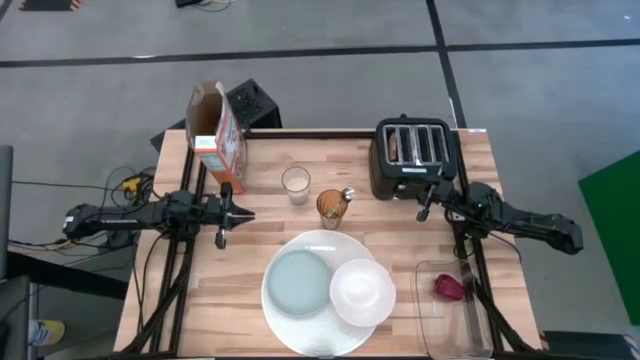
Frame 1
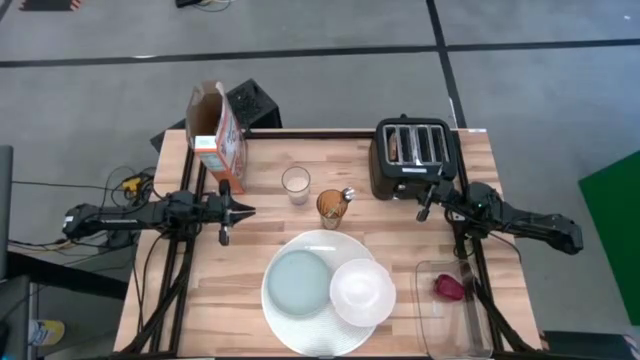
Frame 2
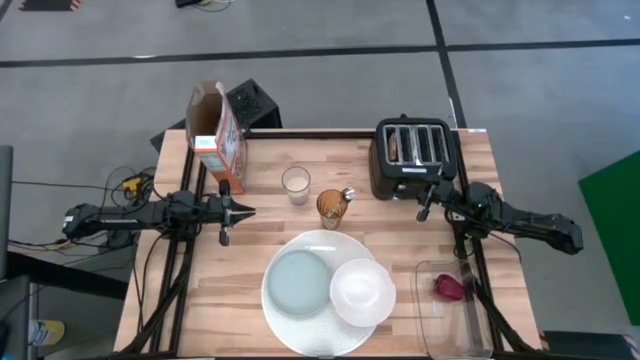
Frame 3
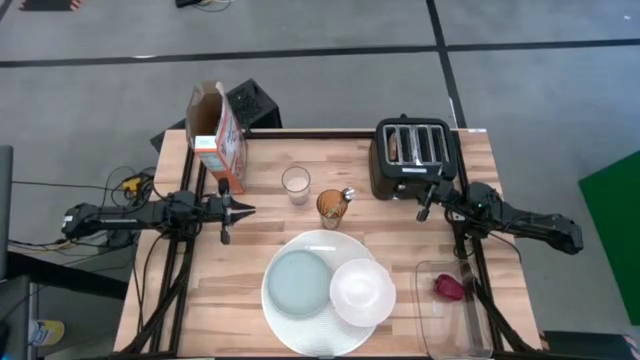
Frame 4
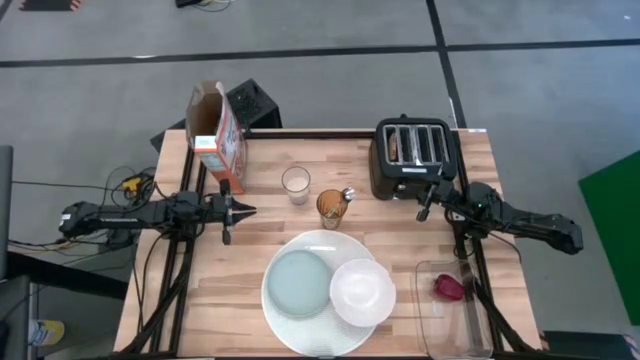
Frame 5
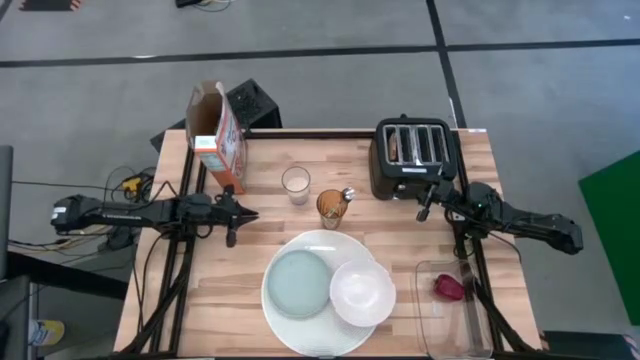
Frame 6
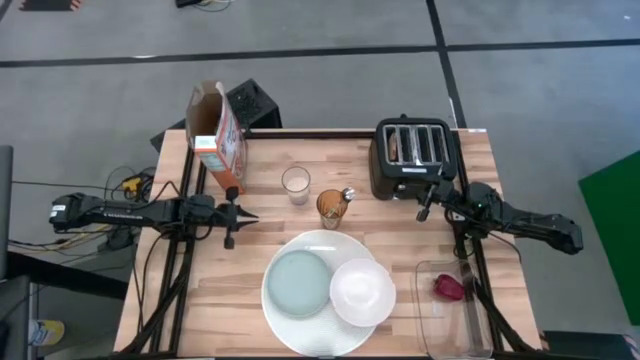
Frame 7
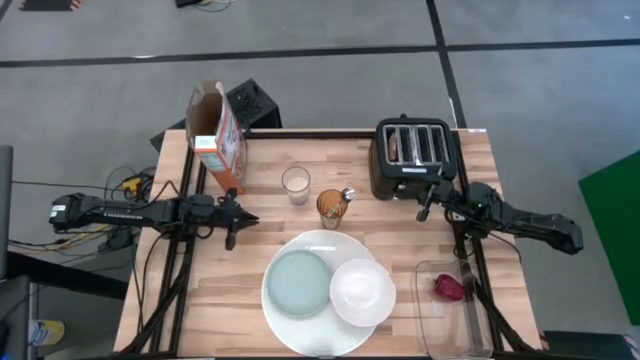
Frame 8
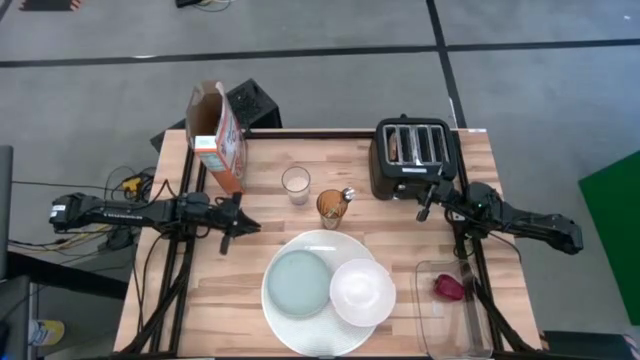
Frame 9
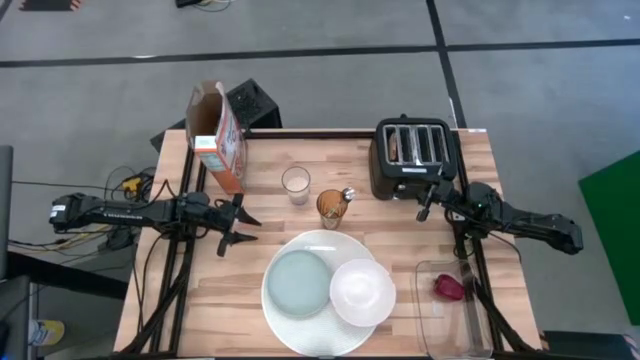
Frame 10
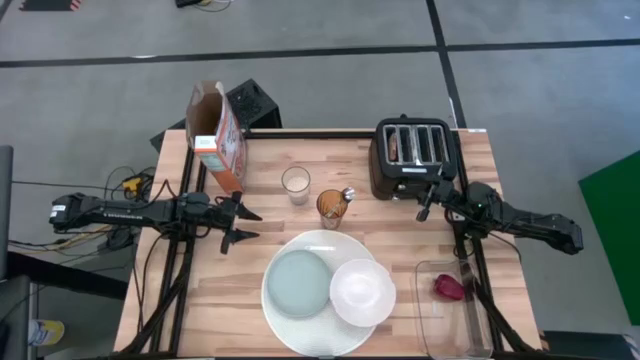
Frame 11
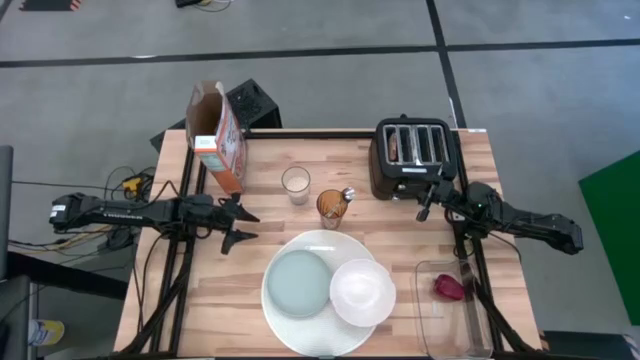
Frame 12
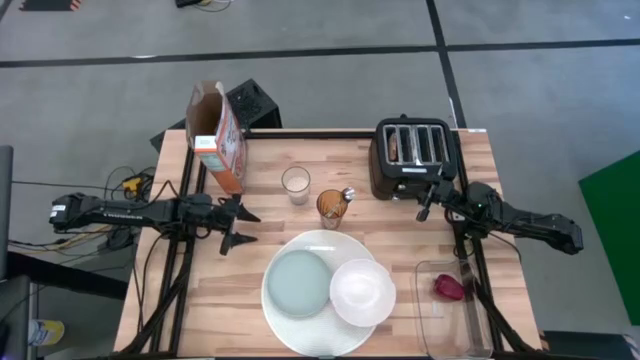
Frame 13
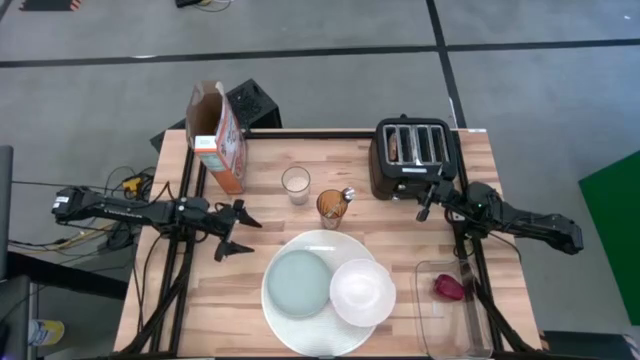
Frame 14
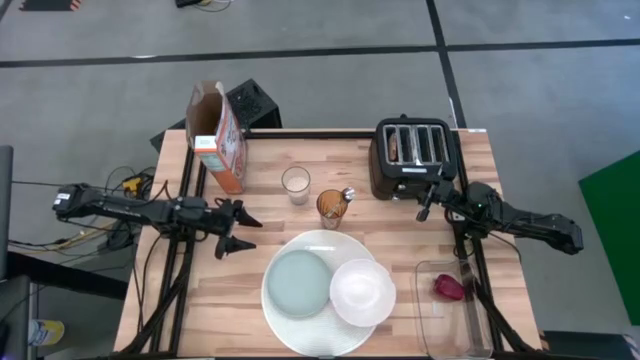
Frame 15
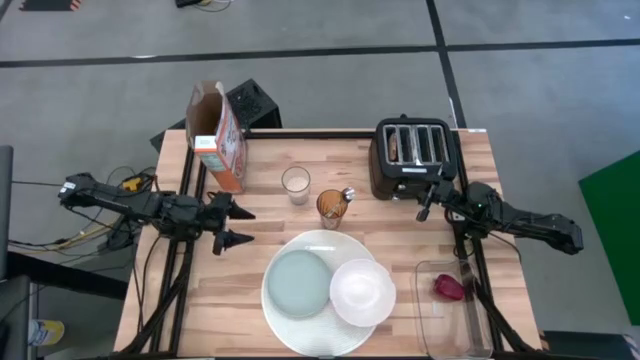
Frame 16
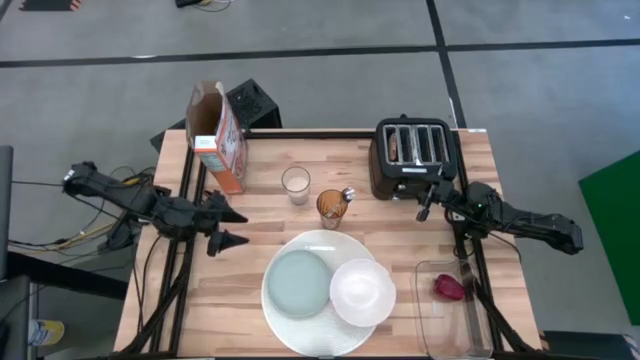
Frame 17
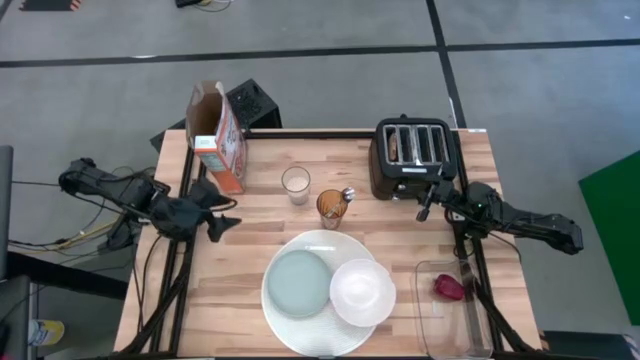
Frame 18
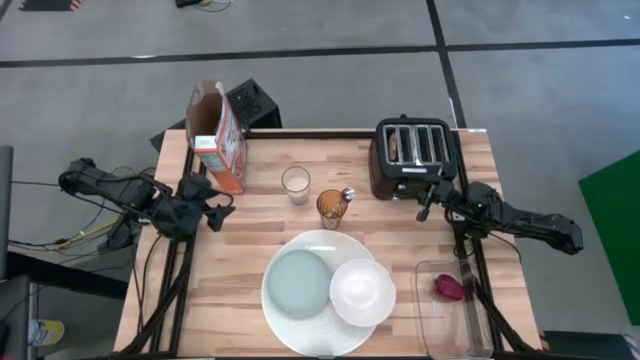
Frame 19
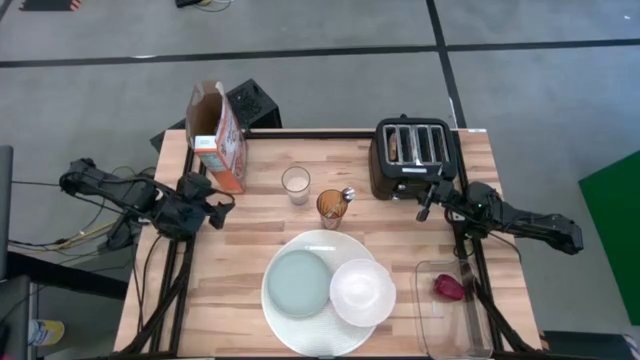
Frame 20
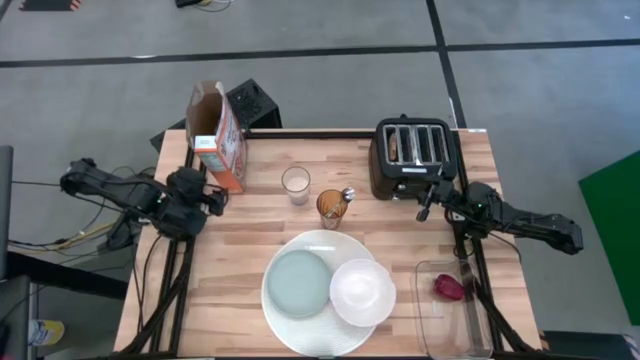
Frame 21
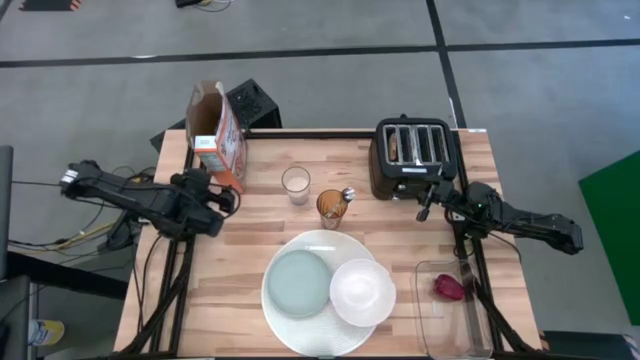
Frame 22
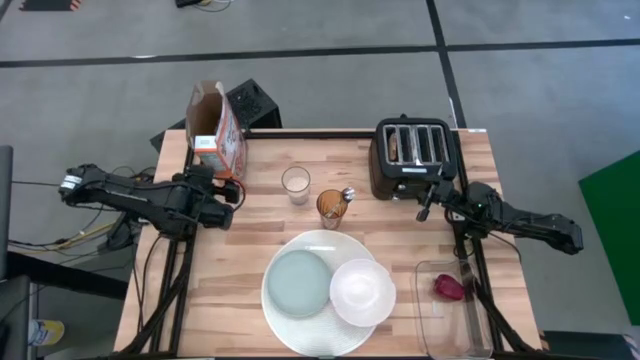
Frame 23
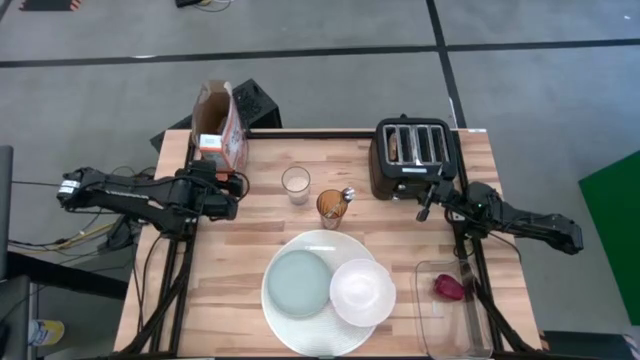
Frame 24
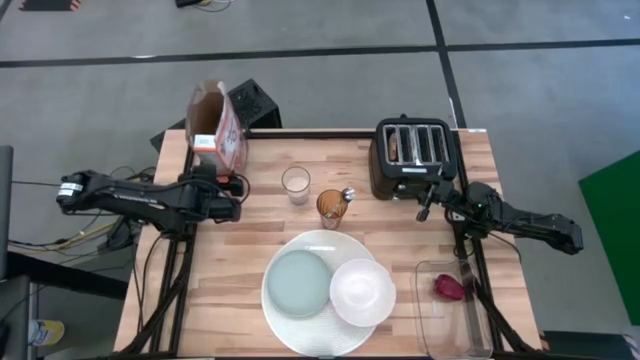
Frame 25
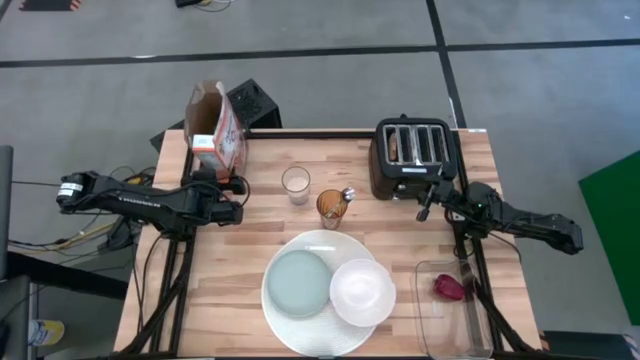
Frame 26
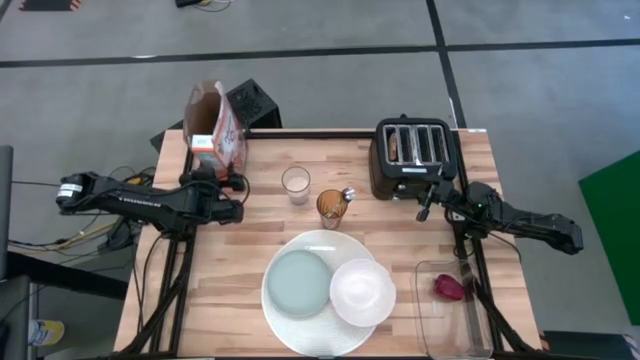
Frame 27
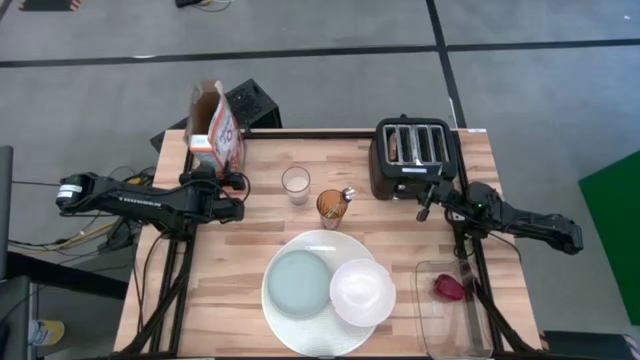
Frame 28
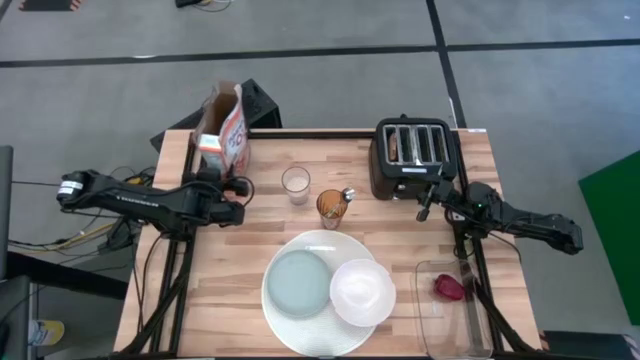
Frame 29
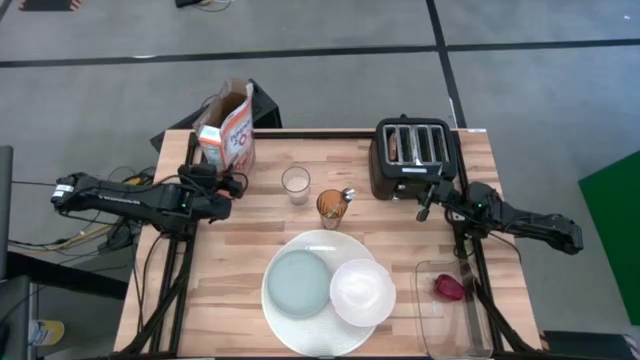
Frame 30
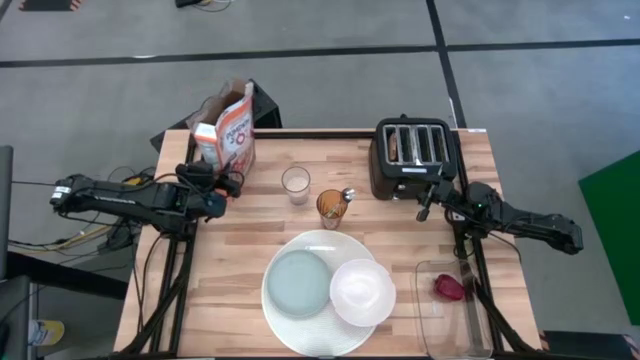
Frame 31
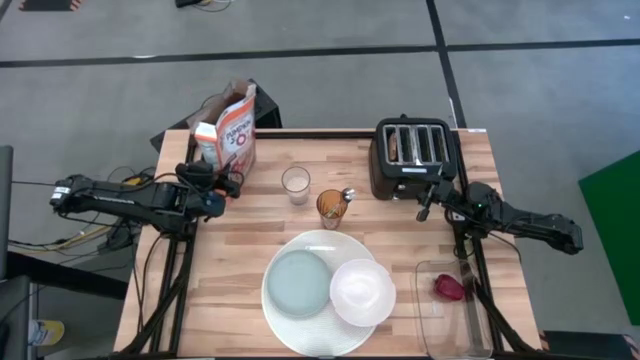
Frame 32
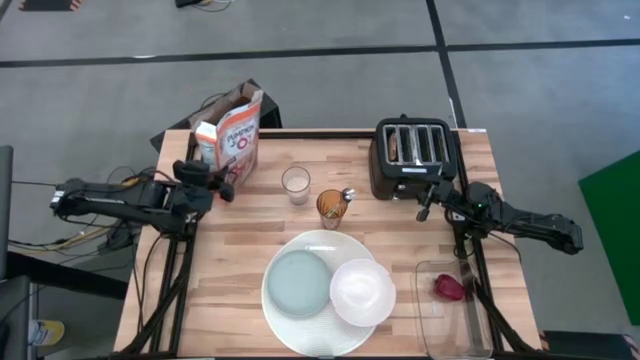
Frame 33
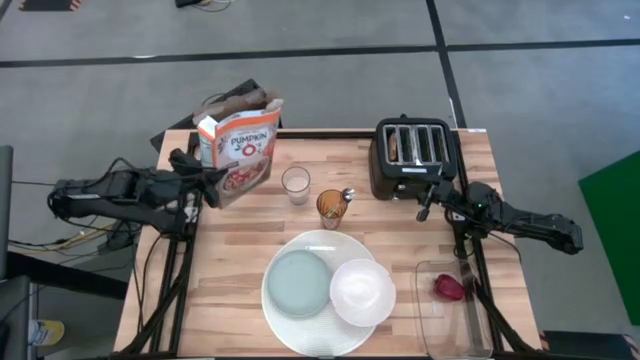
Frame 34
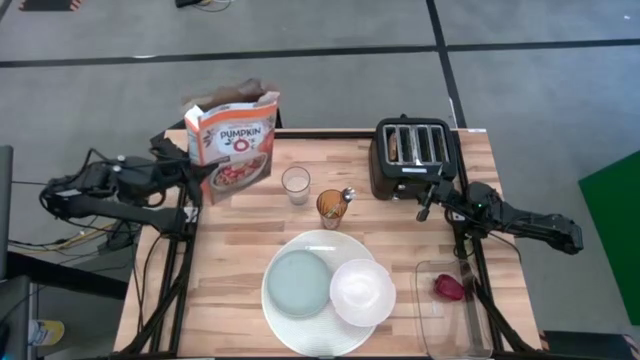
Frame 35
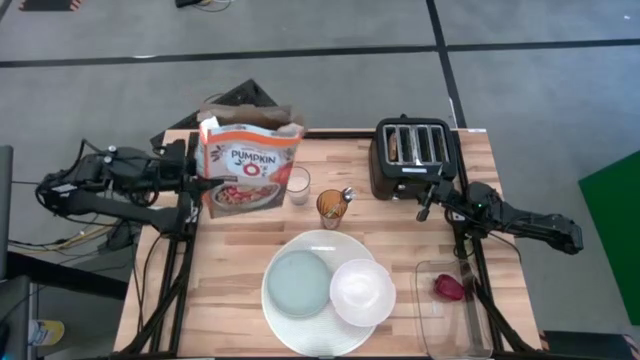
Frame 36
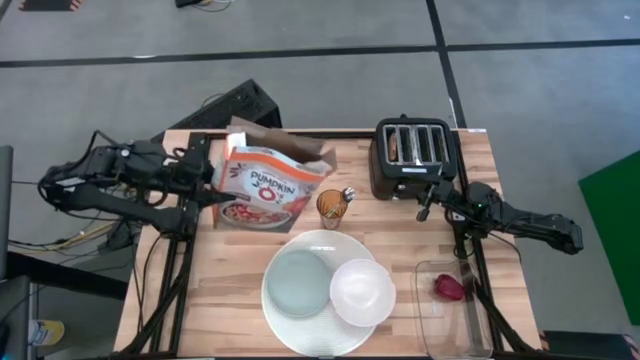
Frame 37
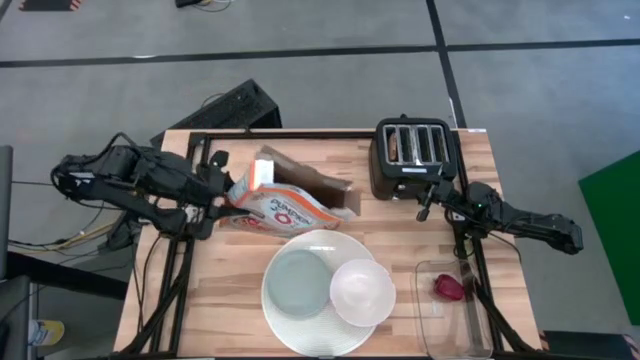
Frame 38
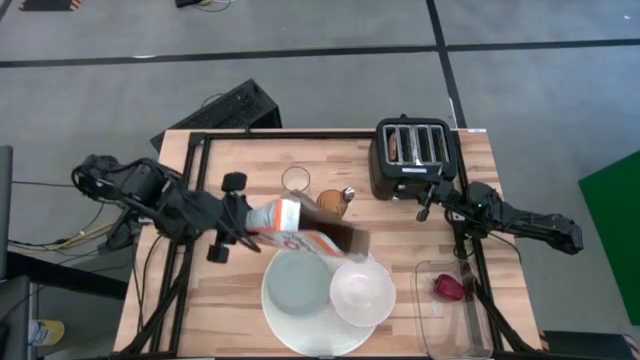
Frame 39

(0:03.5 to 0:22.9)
Task: Arrange a breakfast setting
Pour the cereal from the cereal box into the white bowl

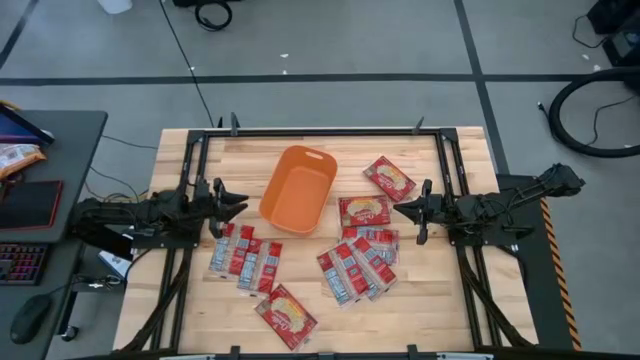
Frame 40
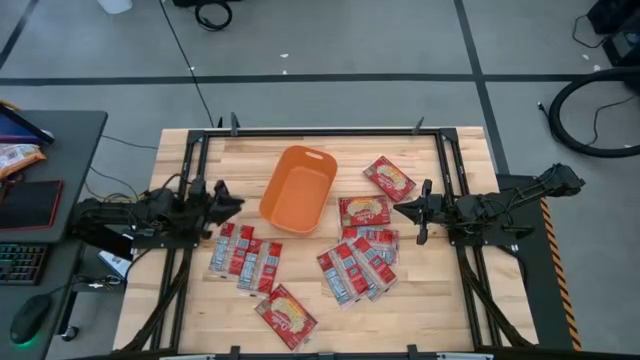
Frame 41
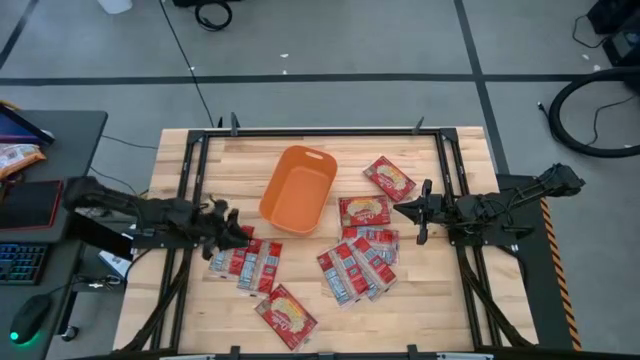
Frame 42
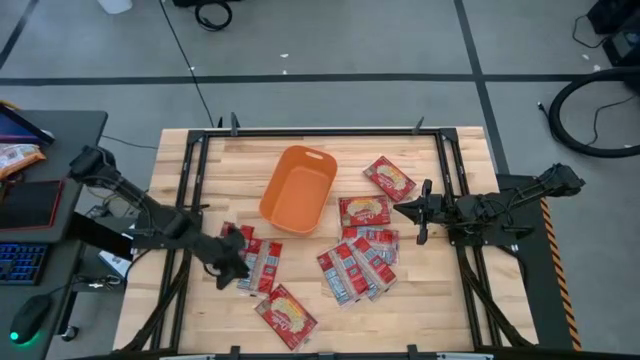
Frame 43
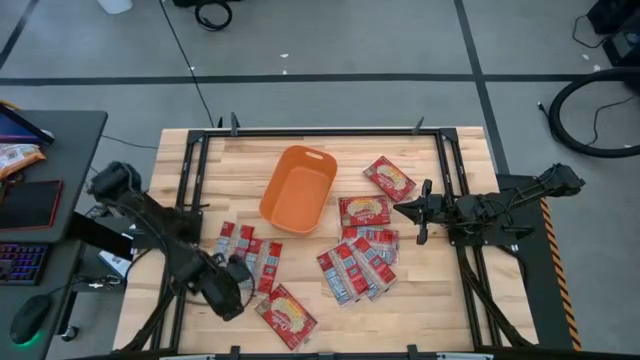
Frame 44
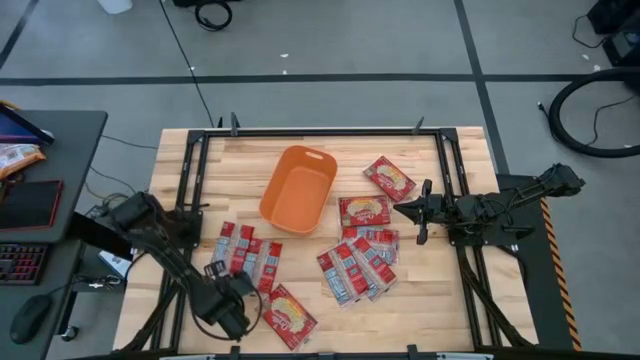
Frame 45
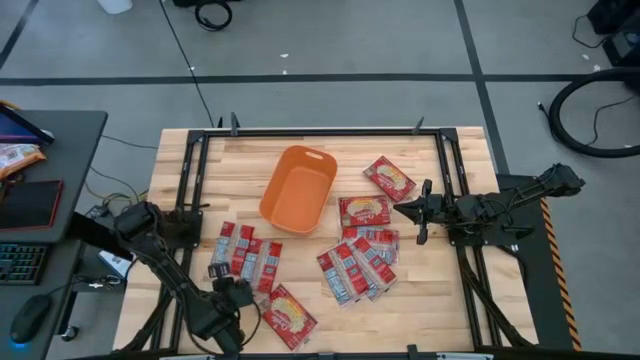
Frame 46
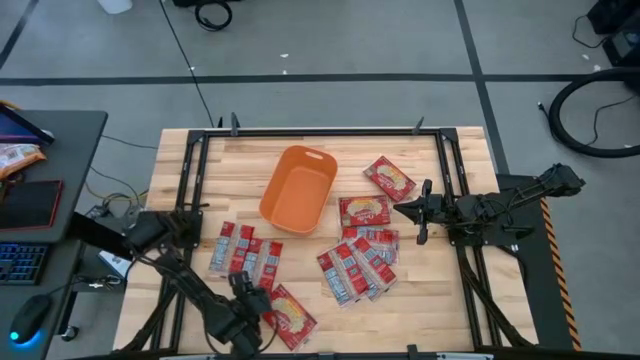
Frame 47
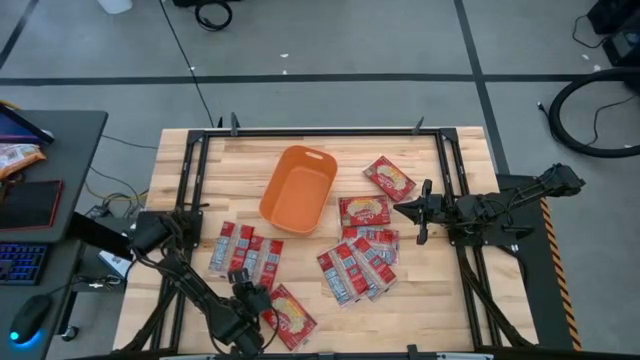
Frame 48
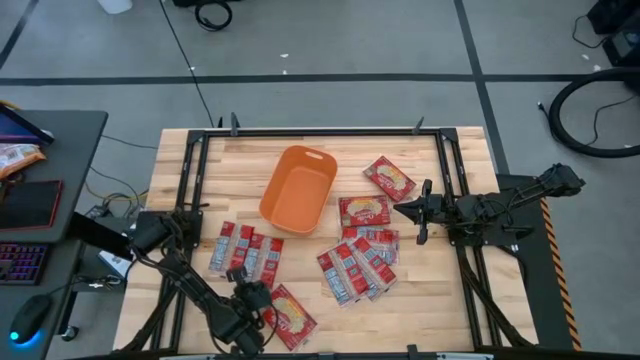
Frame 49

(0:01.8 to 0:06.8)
Task: Sort popcorn bags into baskets
Put the red popcorn pack into the orange bin
